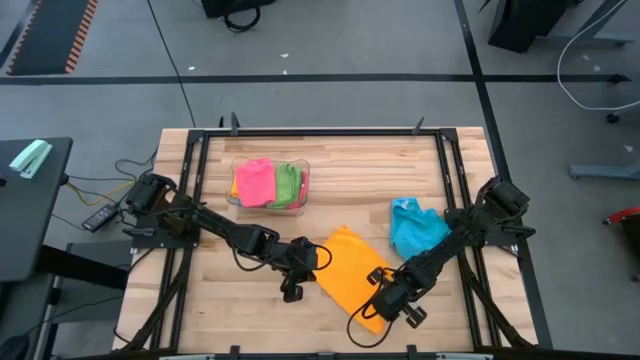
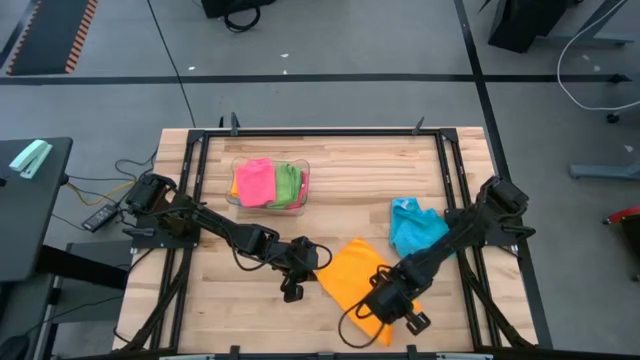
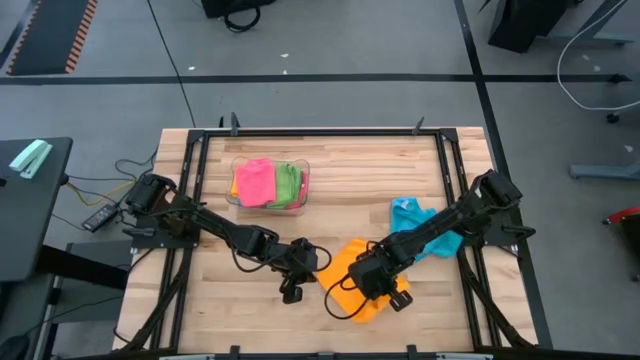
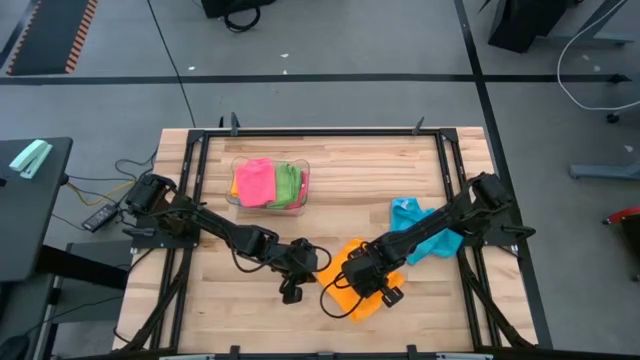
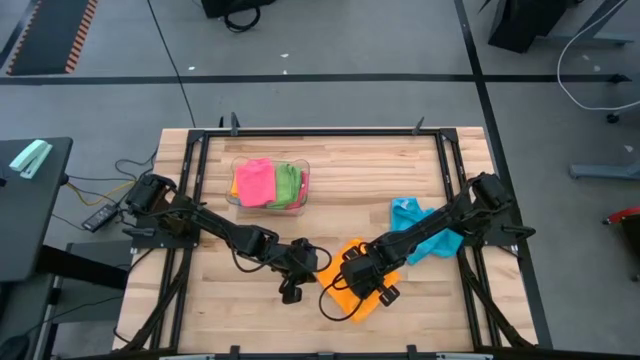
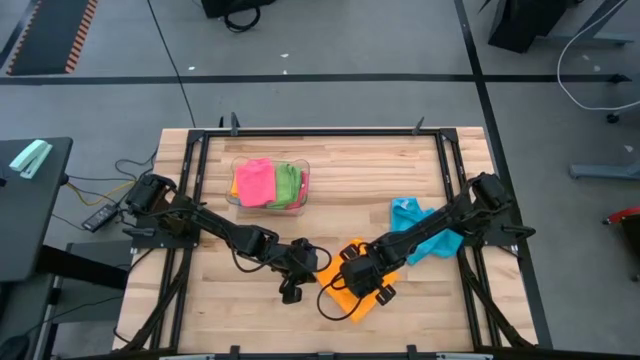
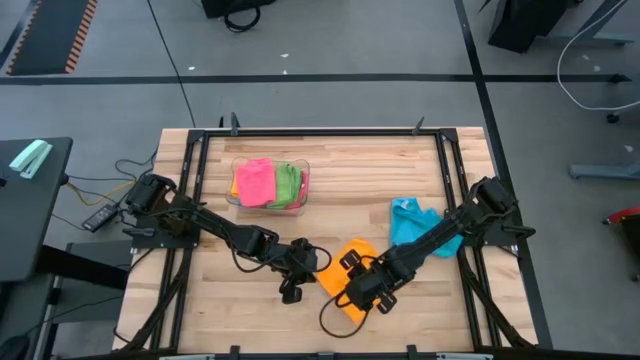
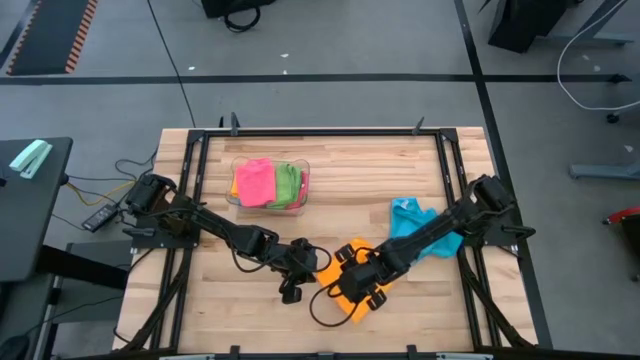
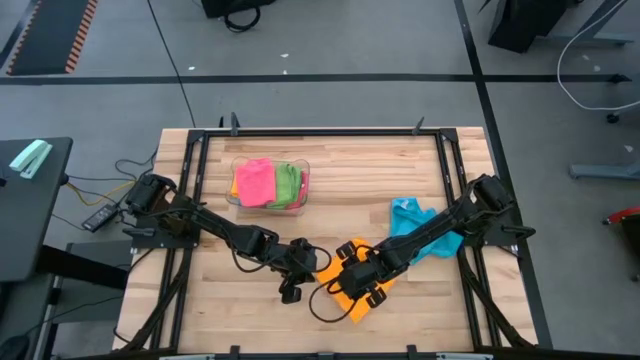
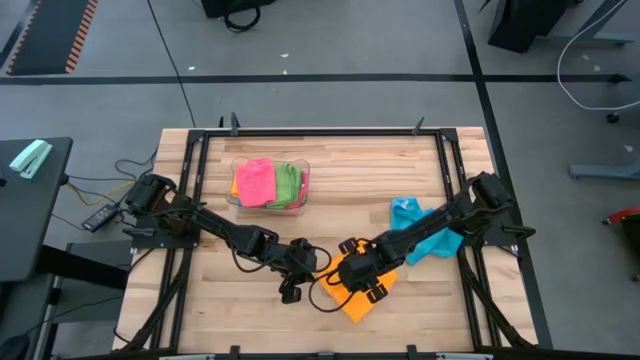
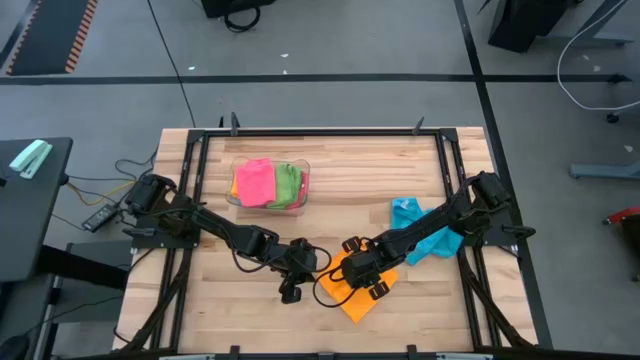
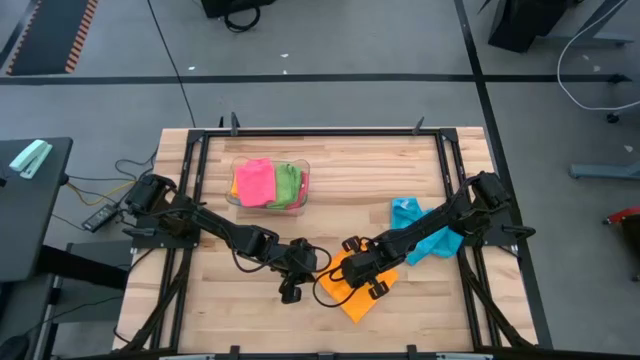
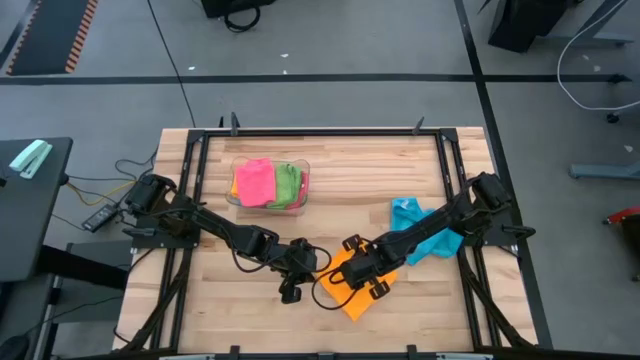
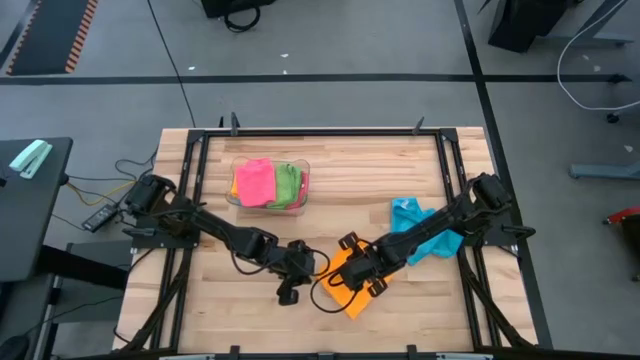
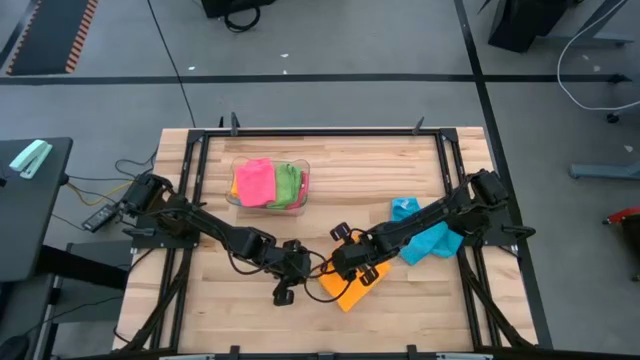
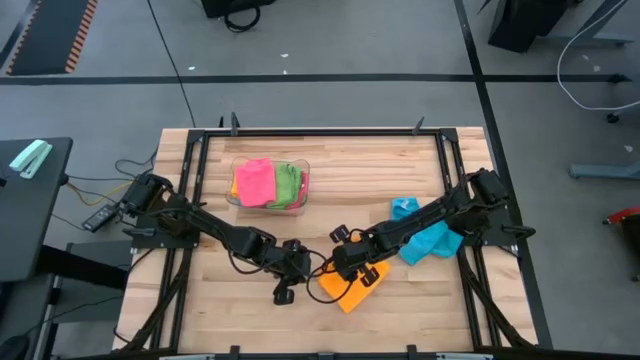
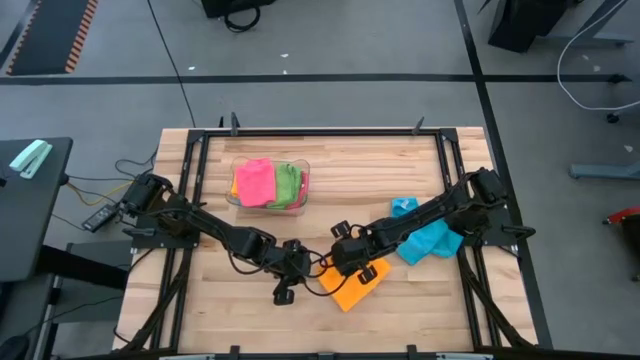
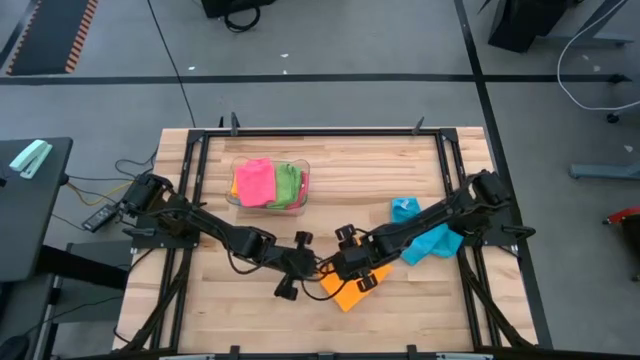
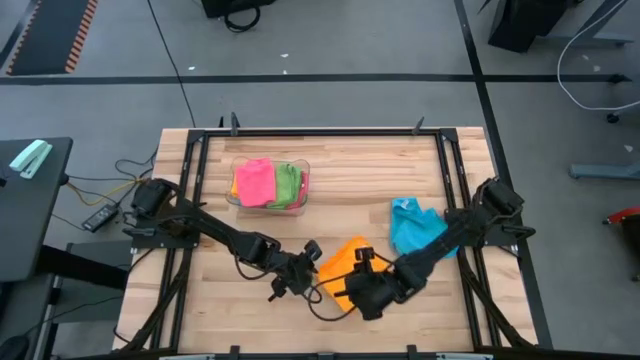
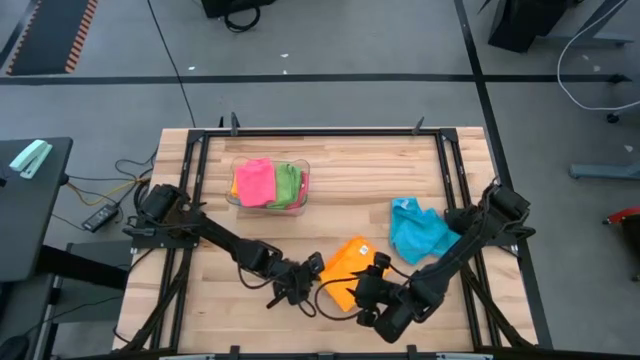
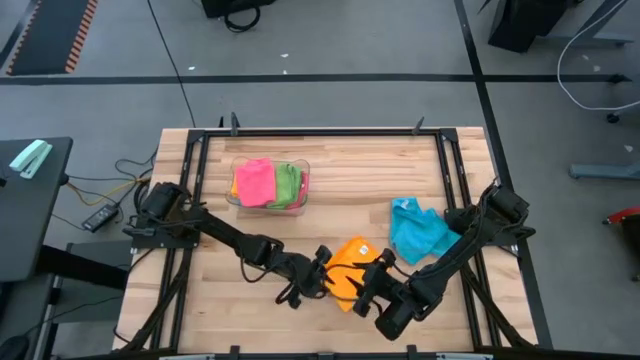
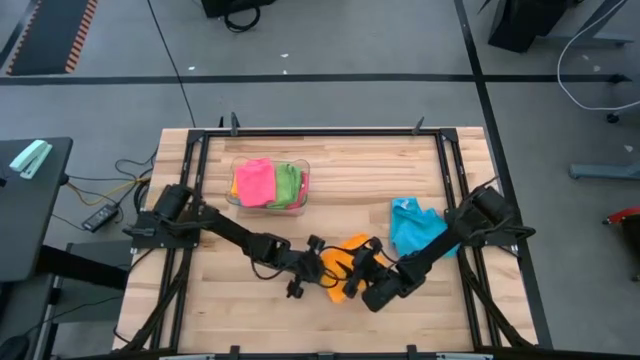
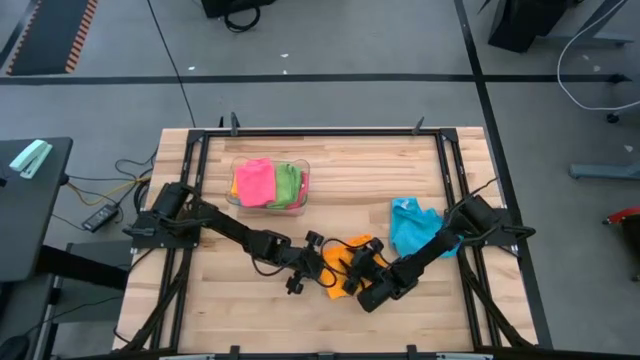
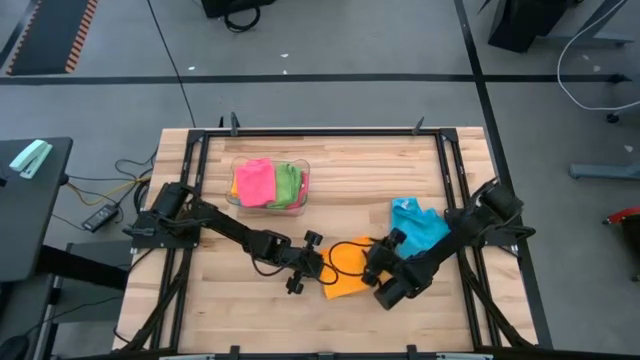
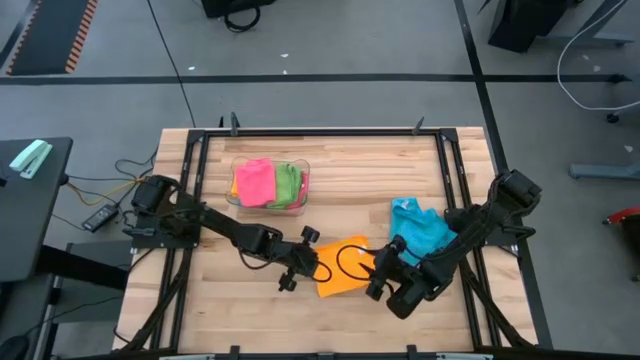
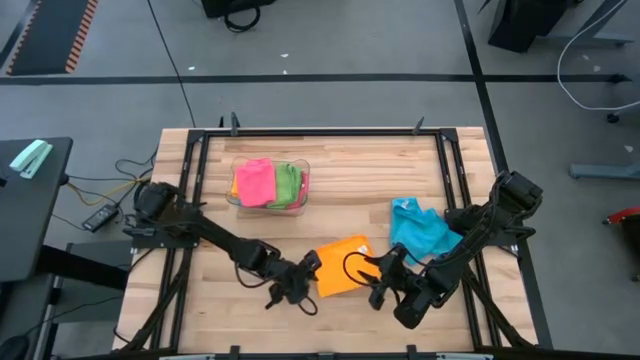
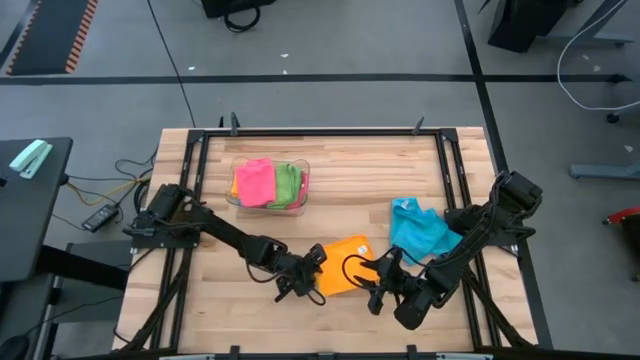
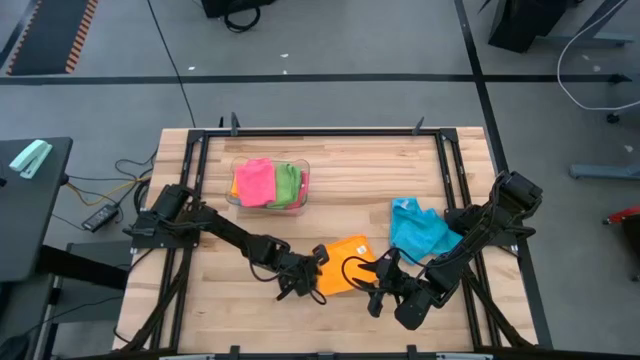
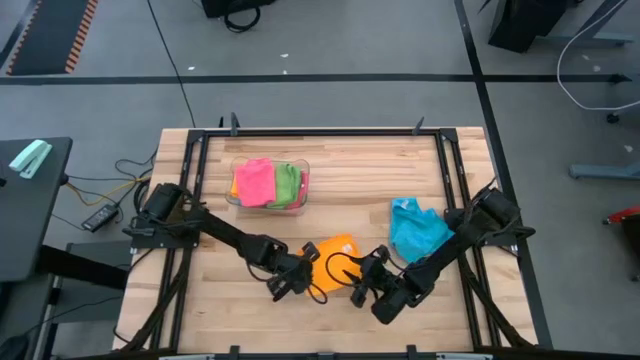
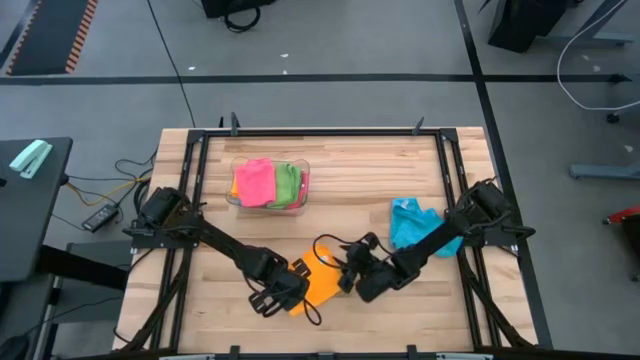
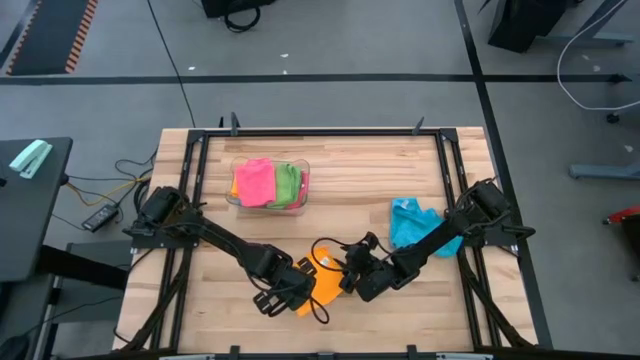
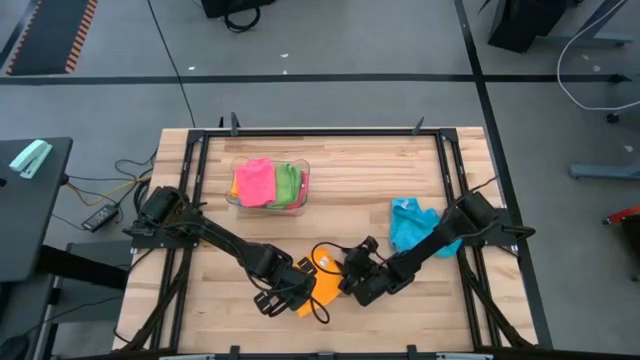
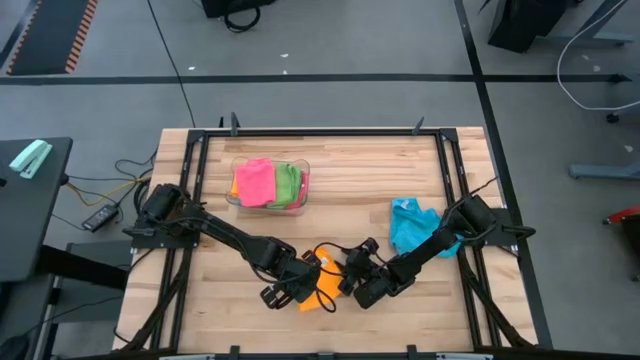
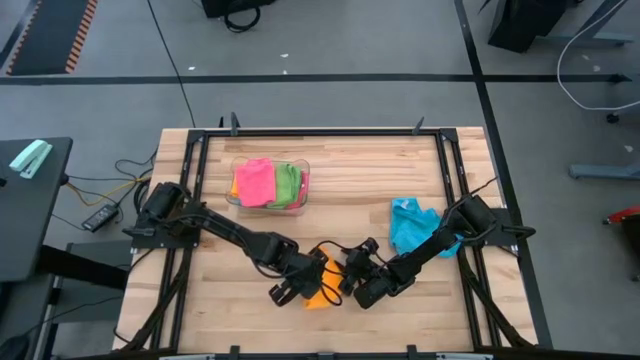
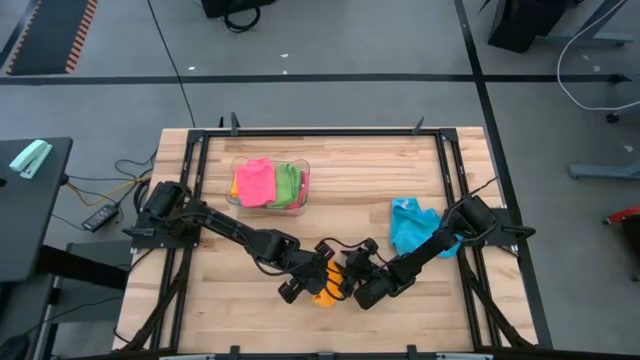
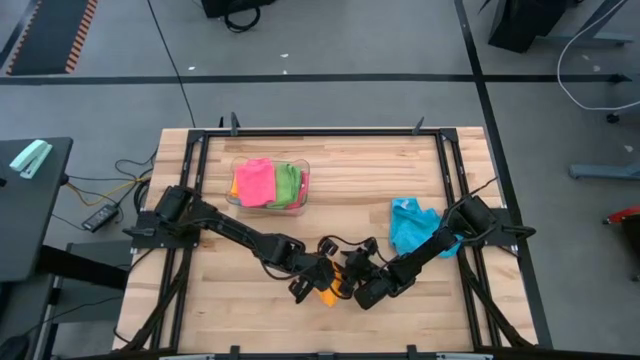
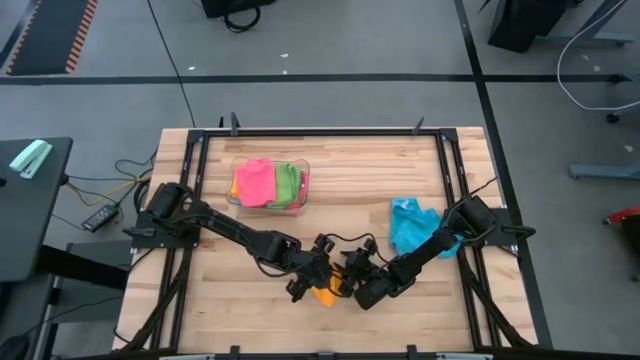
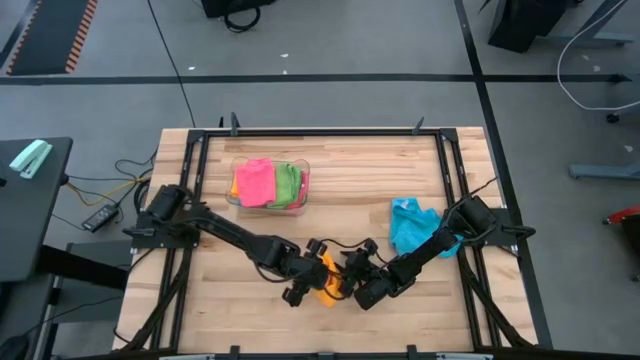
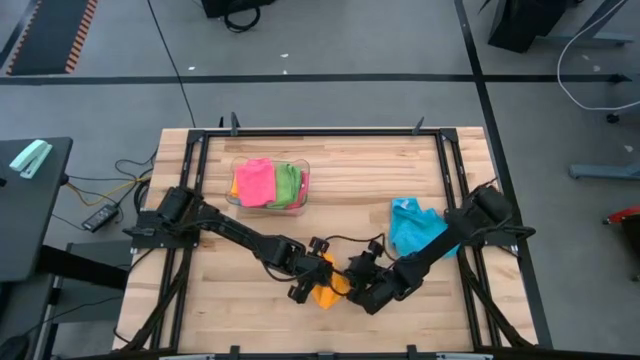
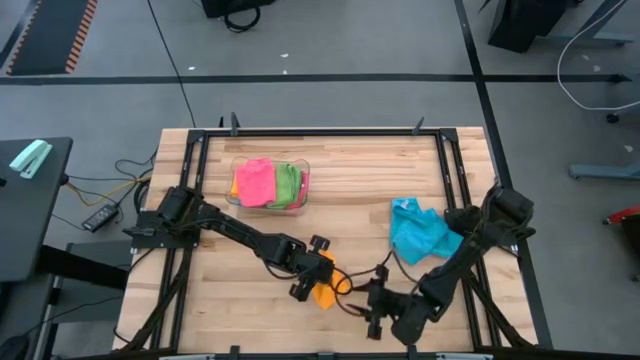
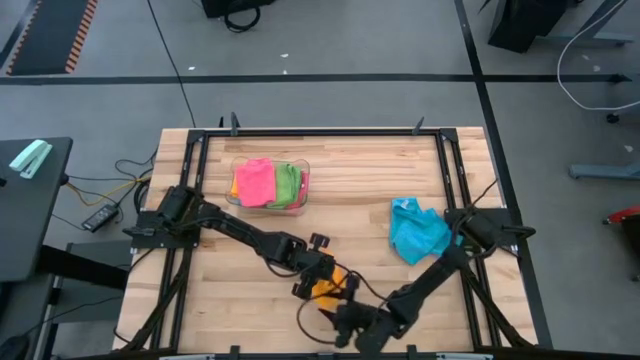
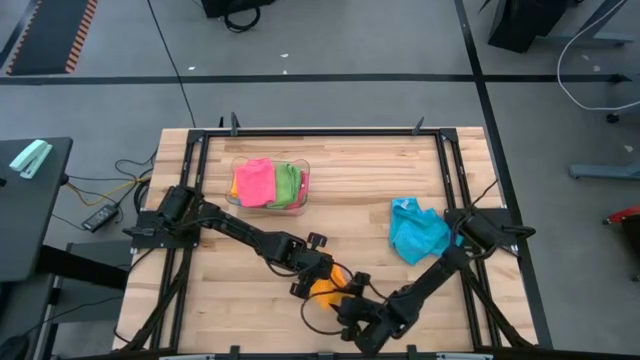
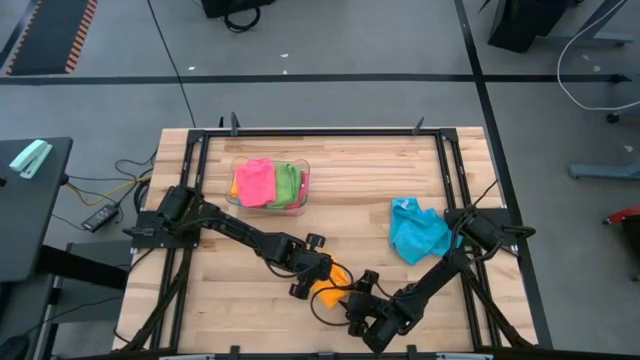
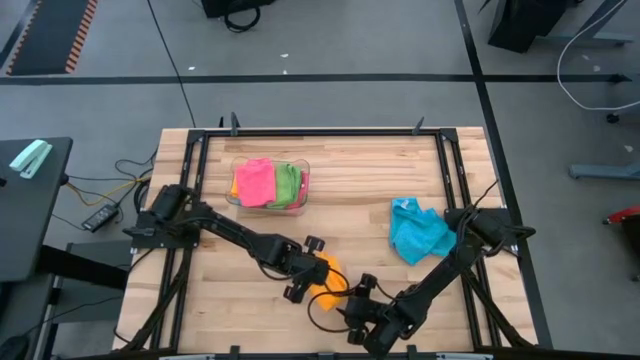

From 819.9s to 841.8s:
Task: Fold microfiber towels
Fold the orange microfiber towel
